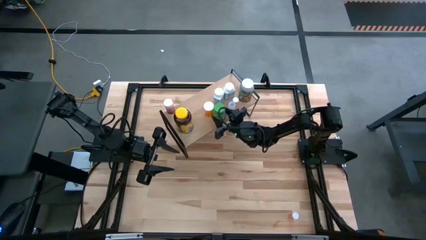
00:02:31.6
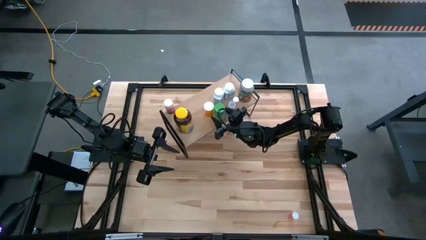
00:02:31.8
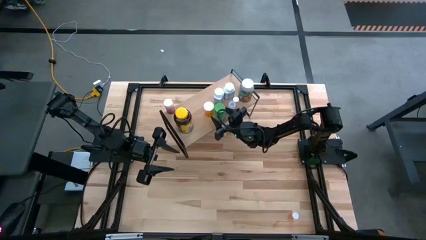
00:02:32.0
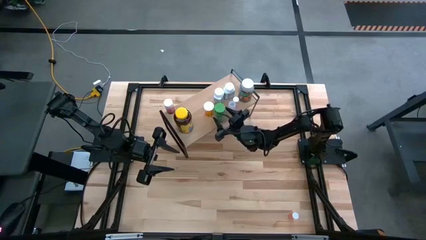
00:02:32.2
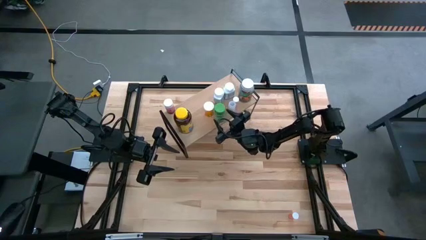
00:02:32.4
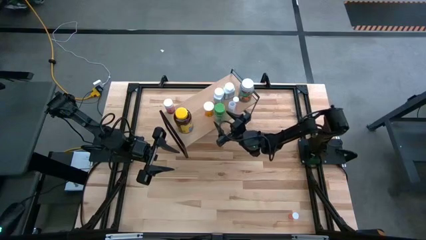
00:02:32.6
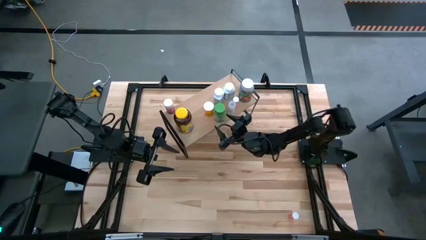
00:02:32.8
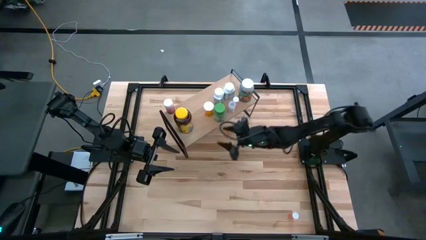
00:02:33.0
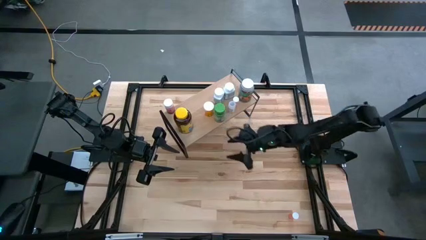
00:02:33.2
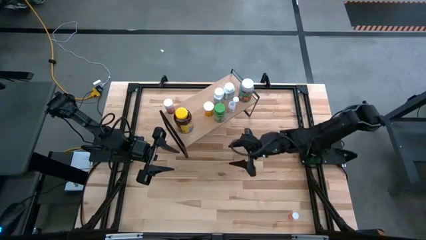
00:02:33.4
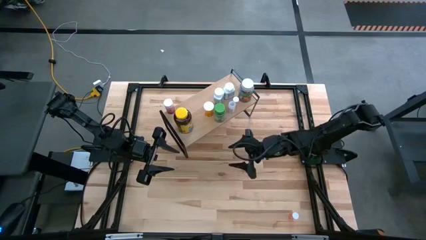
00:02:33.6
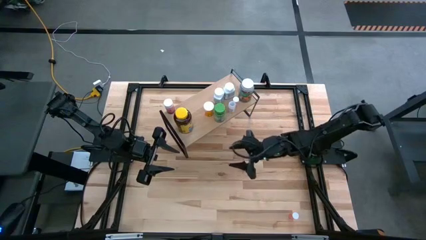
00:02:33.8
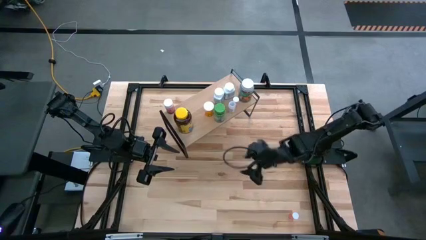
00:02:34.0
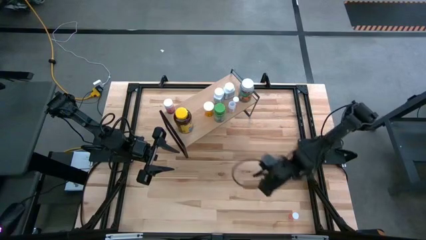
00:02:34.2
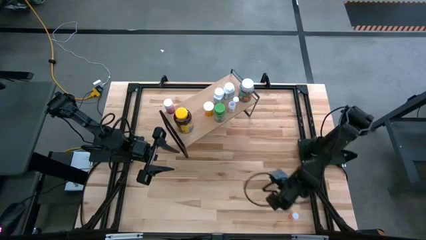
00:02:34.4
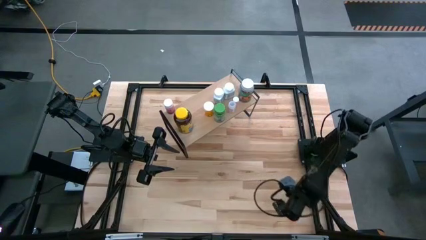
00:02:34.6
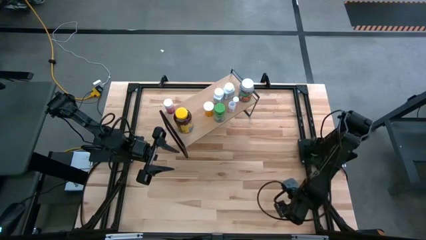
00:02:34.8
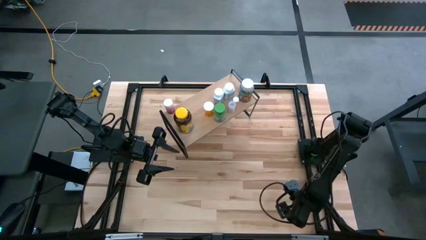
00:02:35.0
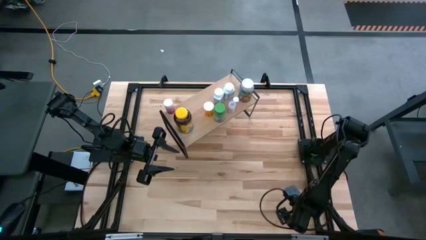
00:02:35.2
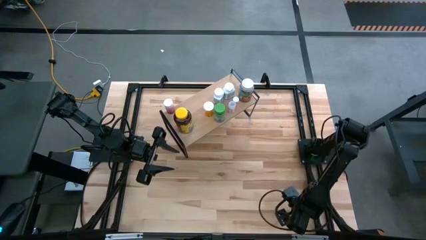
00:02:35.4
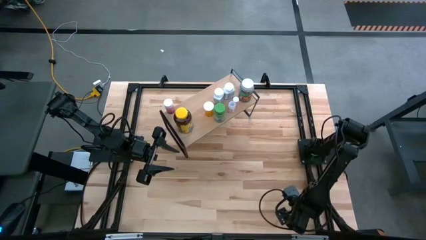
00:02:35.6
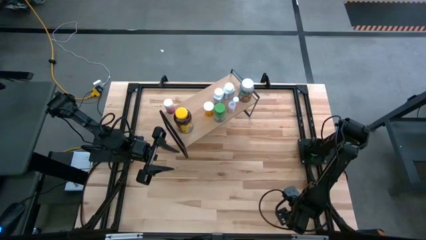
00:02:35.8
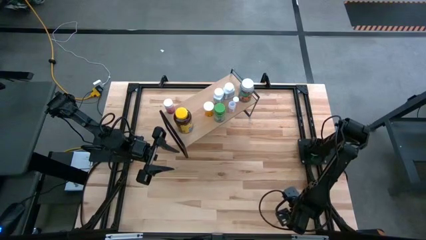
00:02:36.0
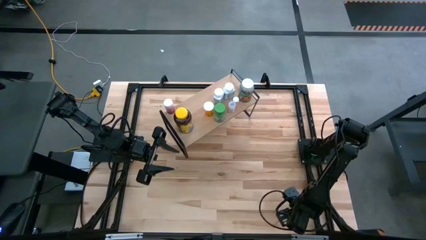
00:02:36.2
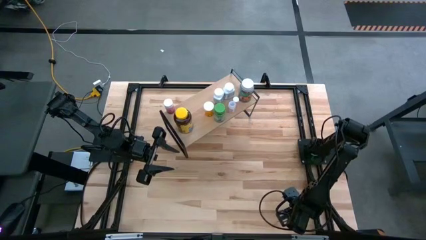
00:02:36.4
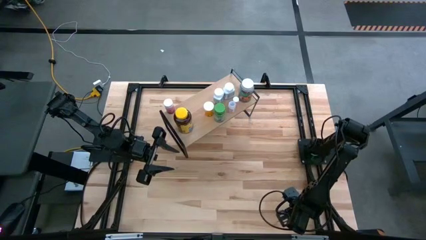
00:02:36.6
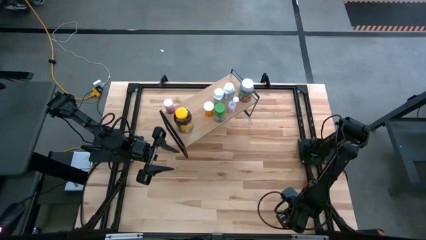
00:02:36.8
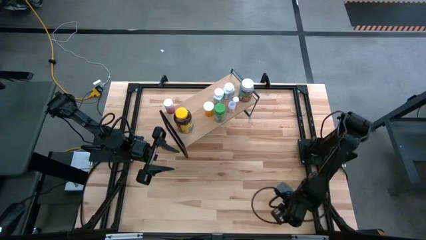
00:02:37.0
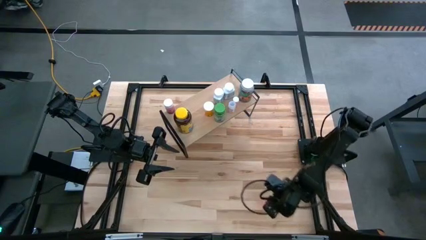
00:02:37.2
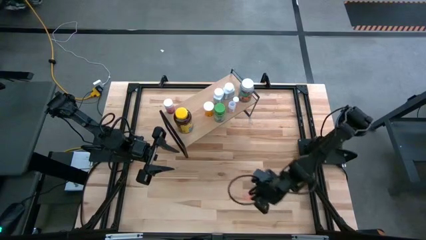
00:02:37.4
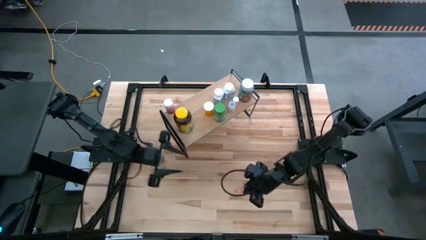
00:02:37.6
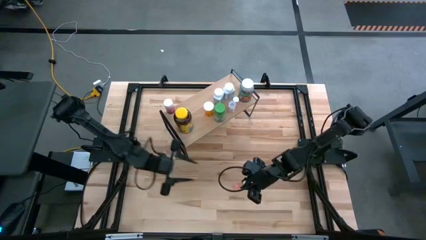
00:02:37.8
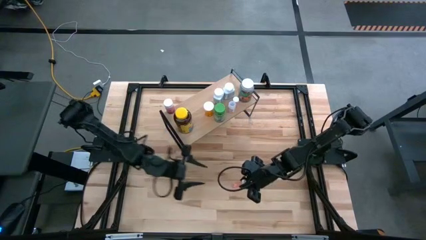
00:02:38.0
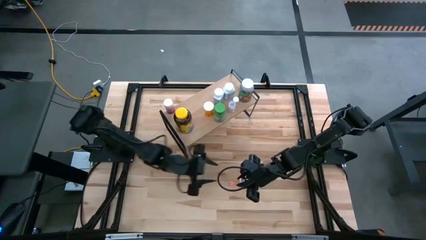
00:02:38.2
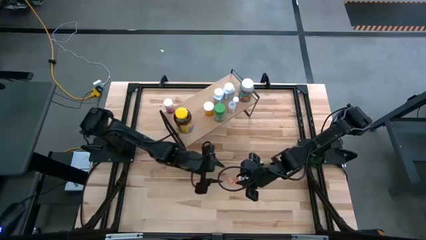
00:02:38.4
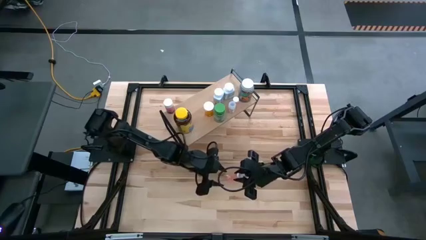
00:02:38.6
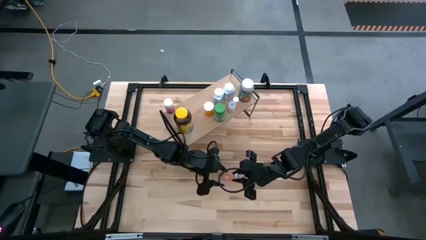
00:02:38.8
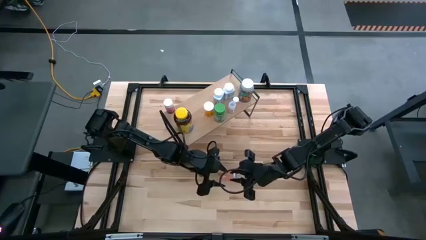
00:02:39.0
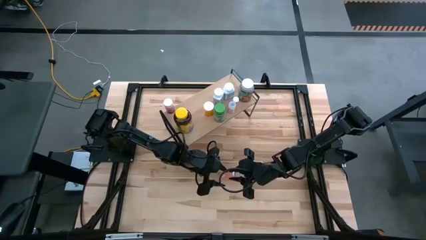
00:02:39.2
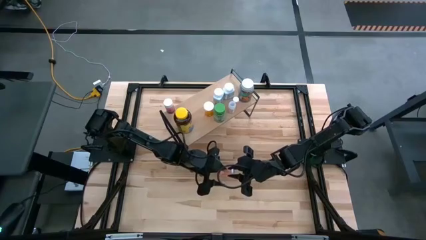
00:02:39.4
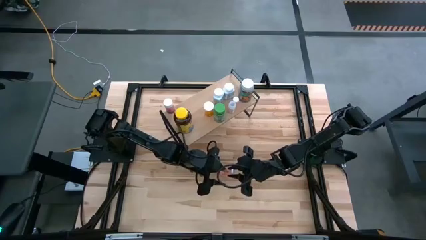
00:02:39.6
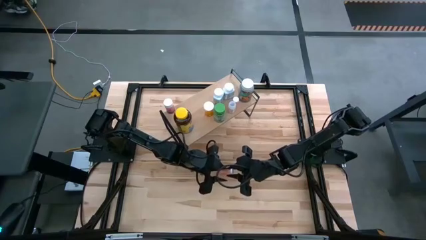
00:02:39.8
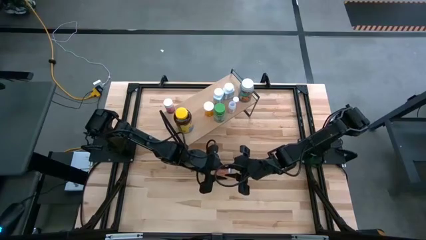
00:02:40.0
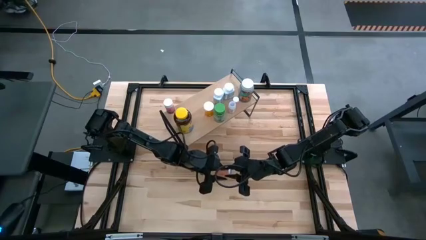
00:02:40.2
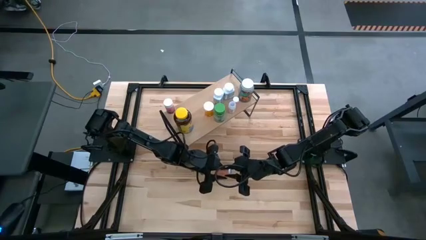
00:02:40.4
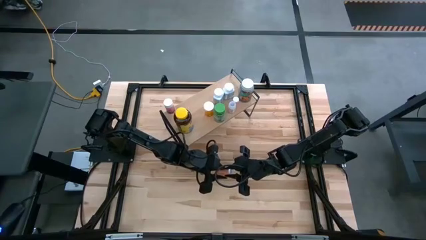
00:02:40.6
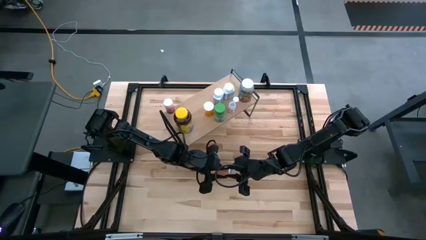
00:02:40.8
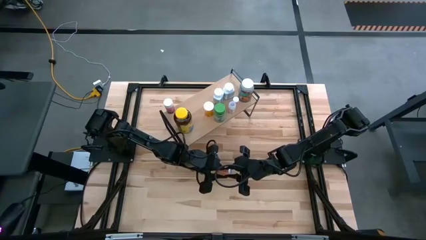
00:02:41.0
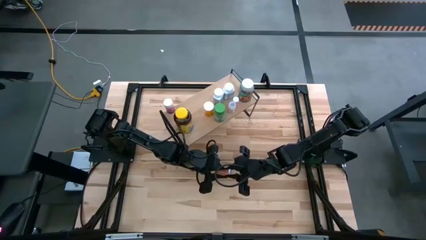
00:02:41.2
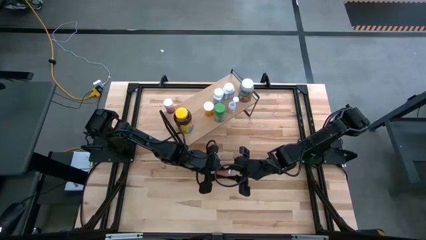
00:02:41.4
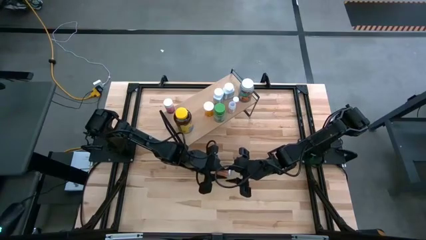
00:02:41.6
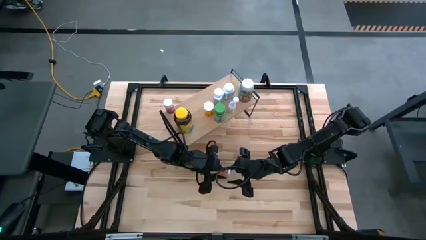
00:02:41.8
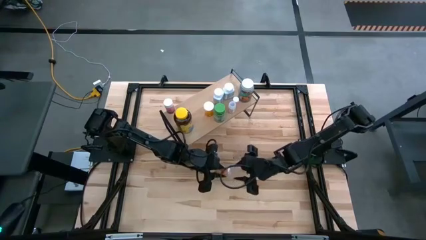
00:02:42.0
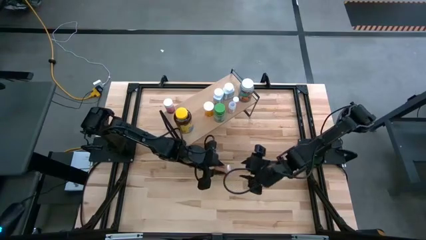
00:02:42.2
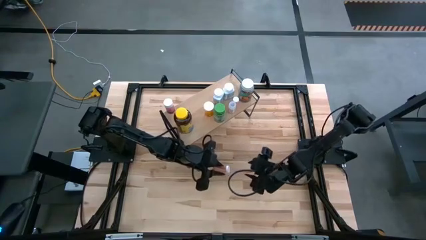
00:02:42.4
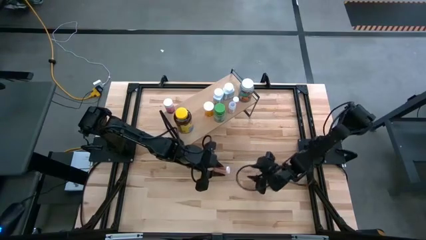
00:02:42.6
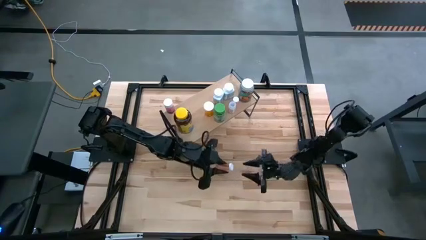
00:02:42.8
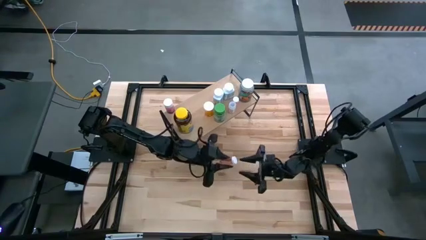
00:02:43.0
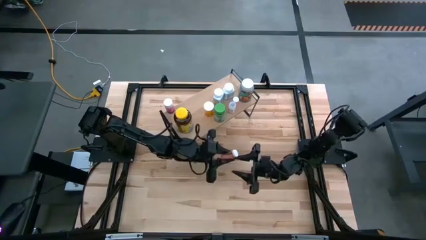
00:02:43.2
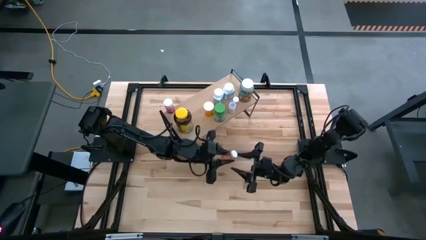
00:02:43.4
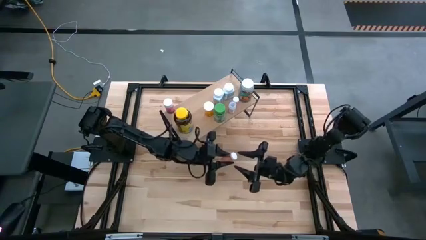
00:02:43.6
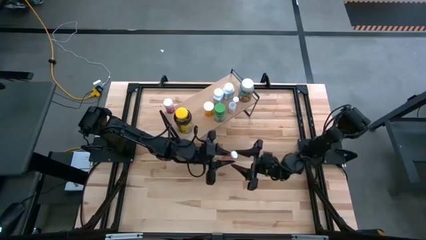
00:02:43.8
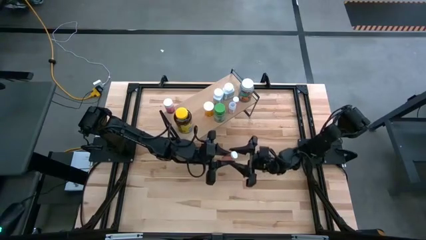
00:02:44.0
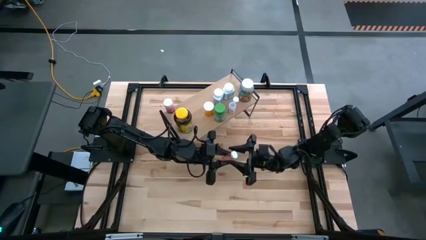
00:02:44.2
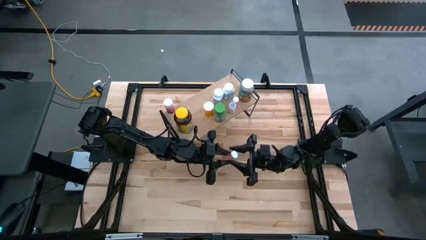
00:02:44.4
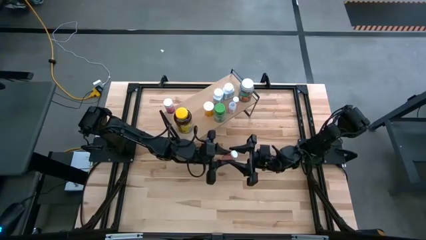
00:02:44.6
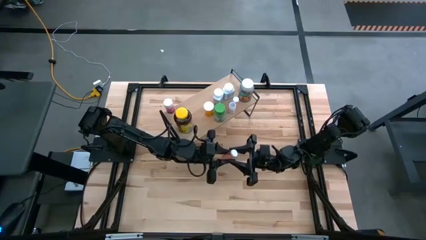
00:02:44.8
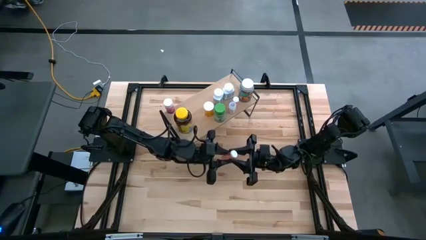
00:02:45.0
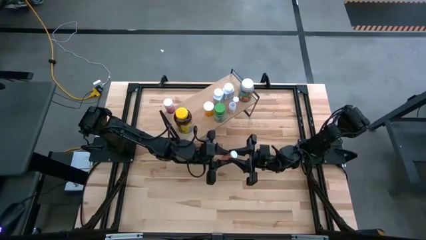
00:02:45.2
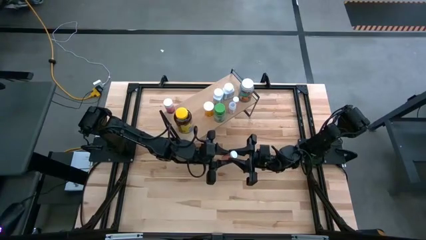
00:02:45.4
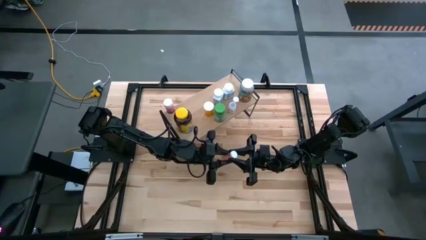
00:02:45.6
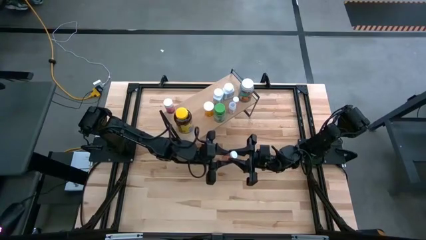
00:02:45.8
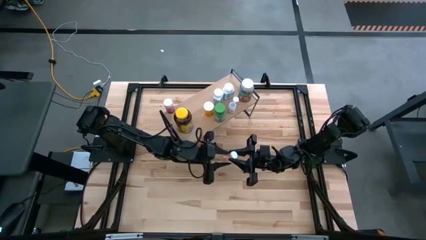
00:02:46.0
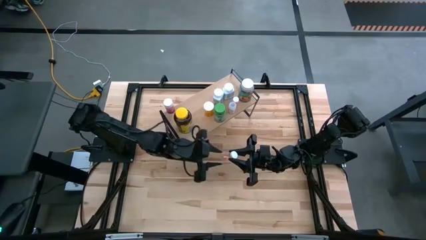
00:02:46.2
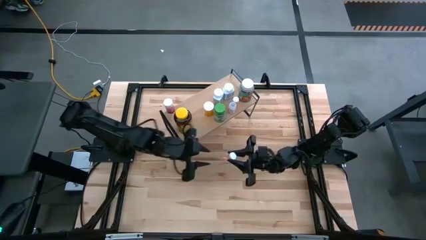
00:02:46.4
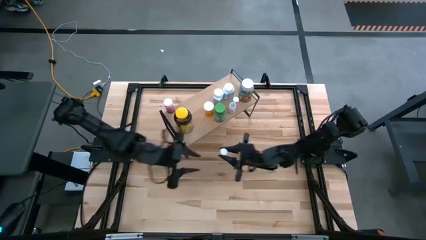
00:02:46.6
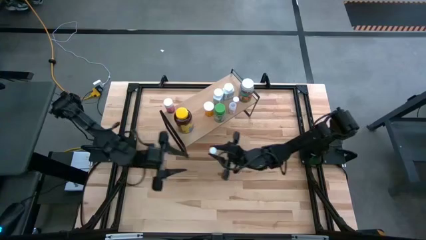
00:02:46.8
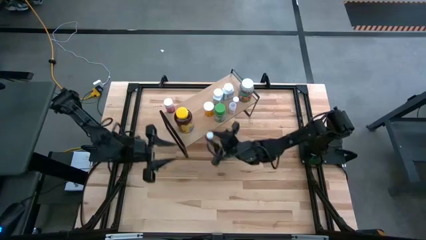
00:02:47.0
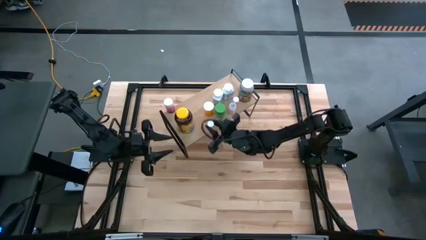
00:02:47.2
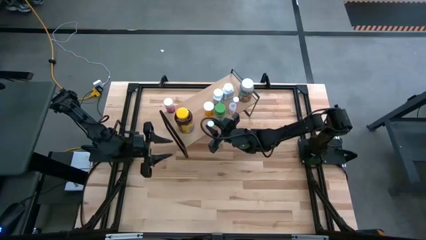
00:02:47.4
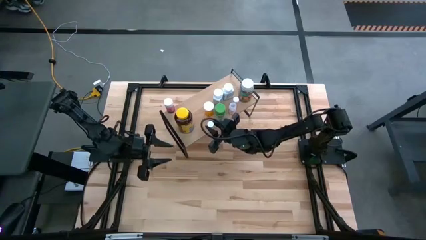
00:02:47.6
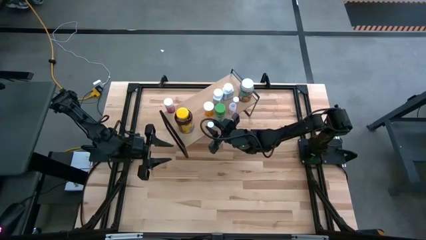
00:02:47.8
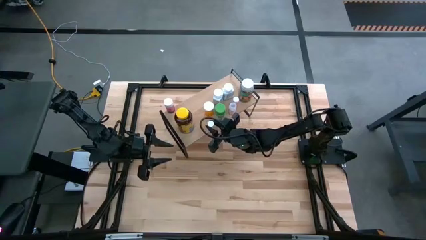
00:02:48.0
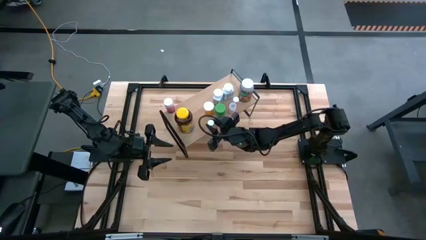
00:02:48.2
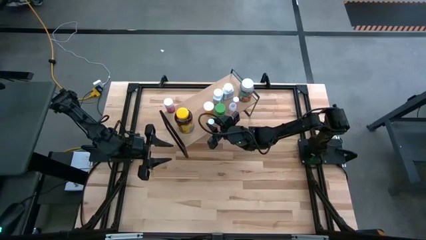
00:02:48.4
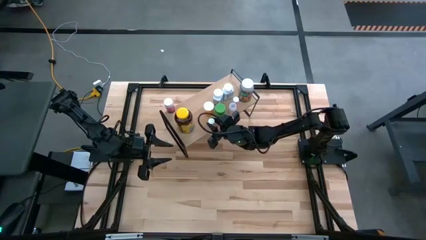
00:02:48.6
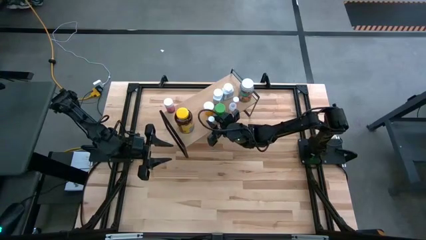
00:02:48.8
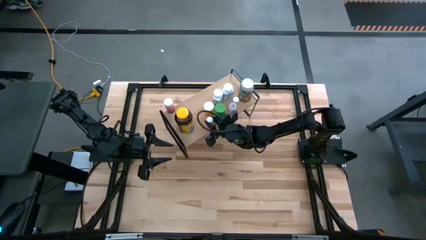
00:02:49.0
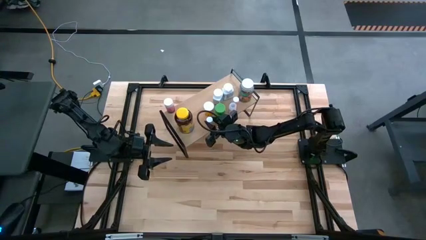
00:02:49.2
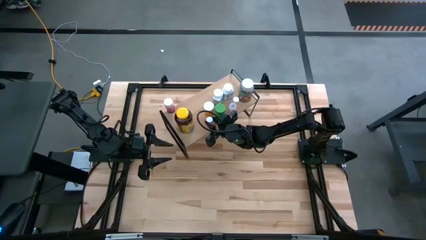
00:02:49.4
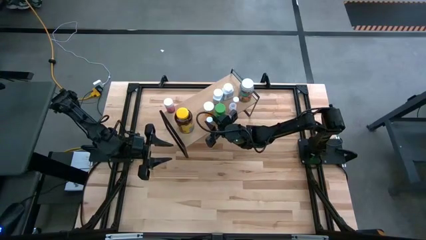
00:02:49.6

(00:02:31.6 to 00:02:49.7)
Task: Pick and place medicine bottles onto shelf by color
Put the light pink medicine bottle on the shelf
